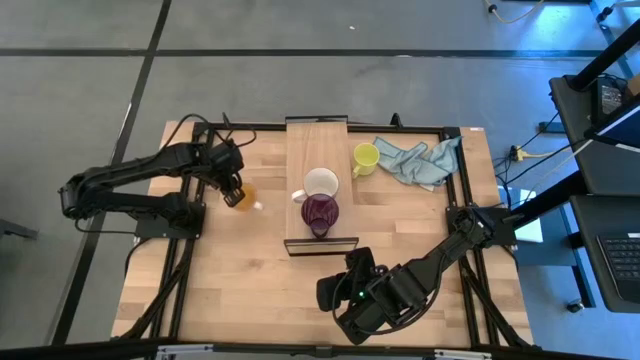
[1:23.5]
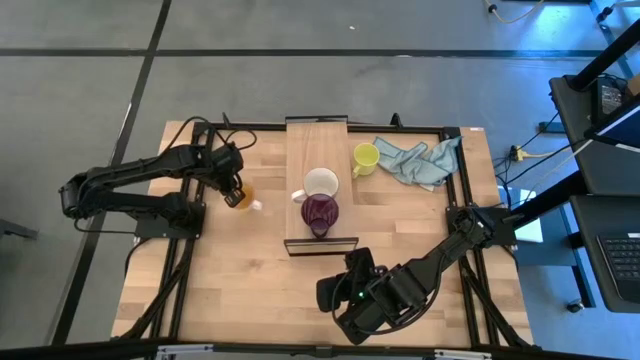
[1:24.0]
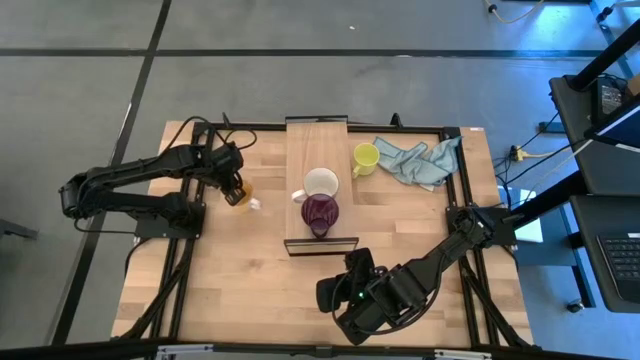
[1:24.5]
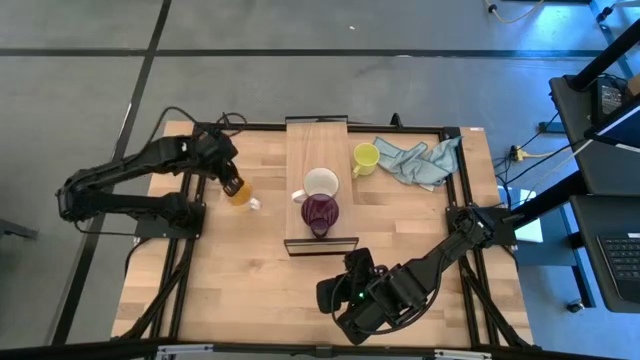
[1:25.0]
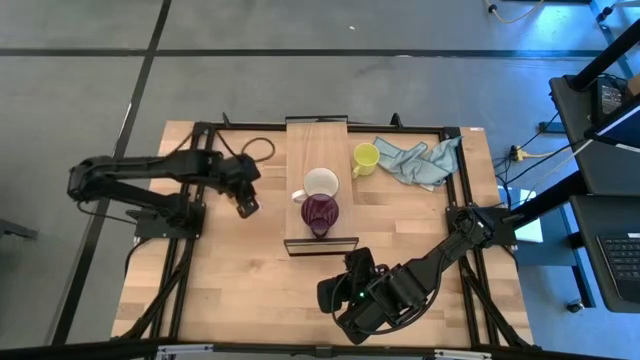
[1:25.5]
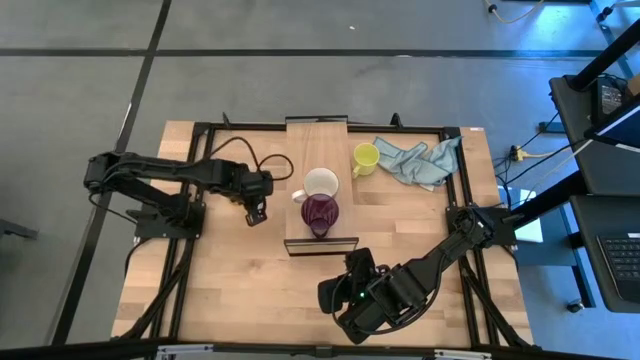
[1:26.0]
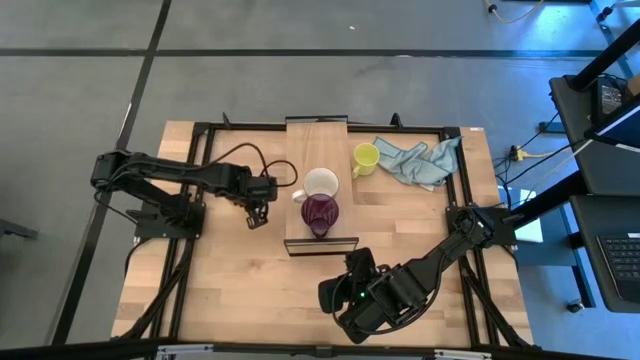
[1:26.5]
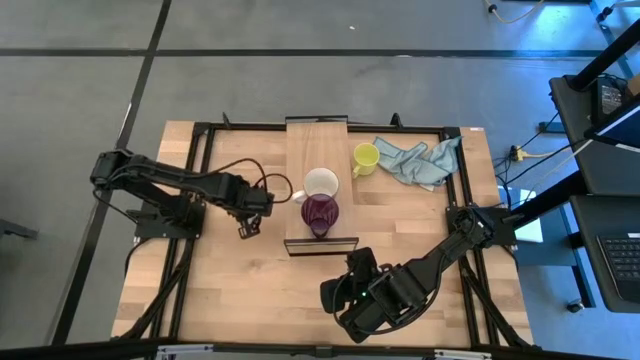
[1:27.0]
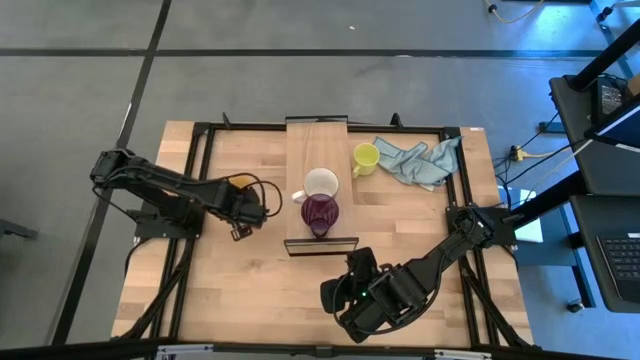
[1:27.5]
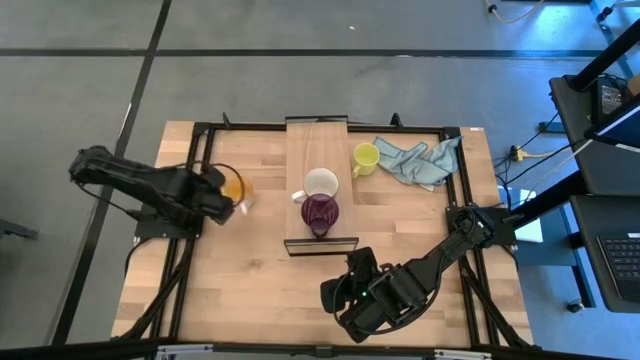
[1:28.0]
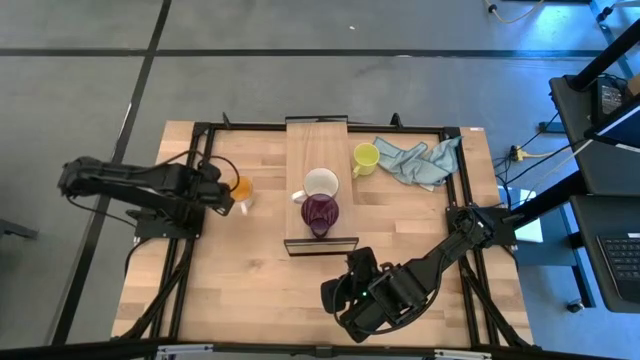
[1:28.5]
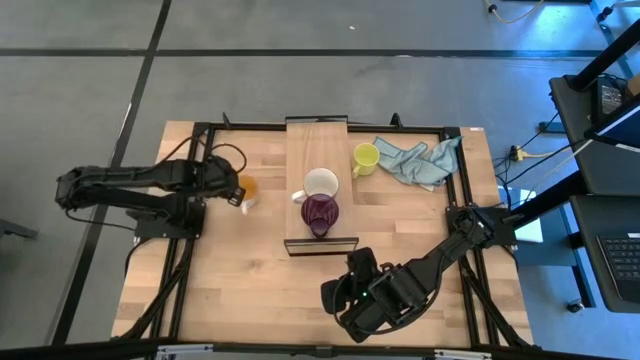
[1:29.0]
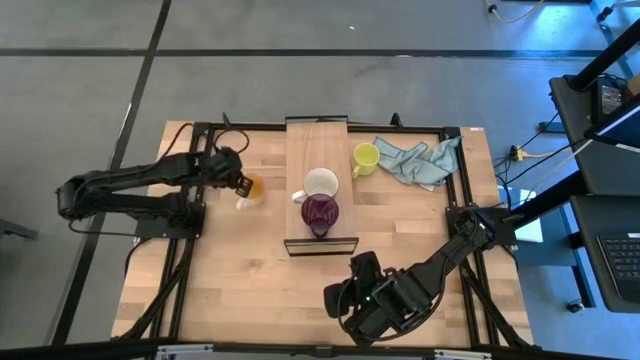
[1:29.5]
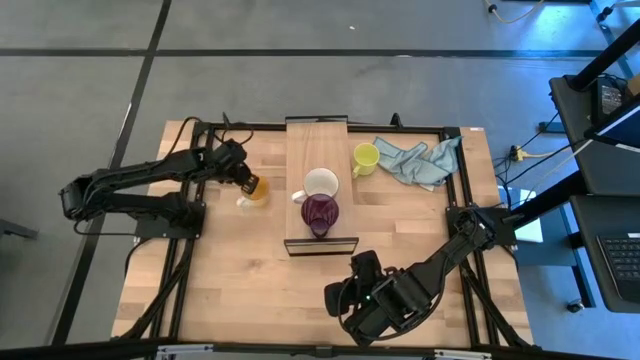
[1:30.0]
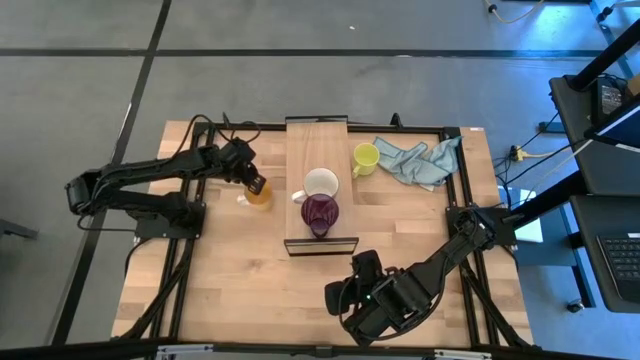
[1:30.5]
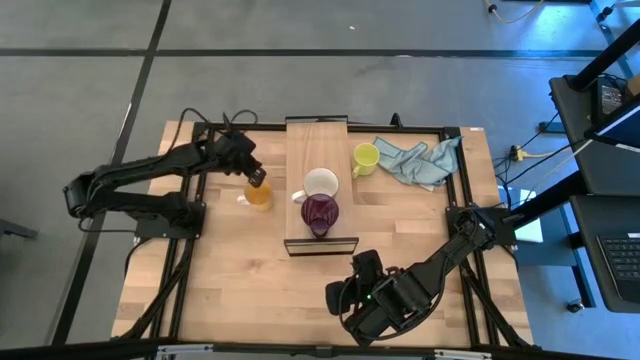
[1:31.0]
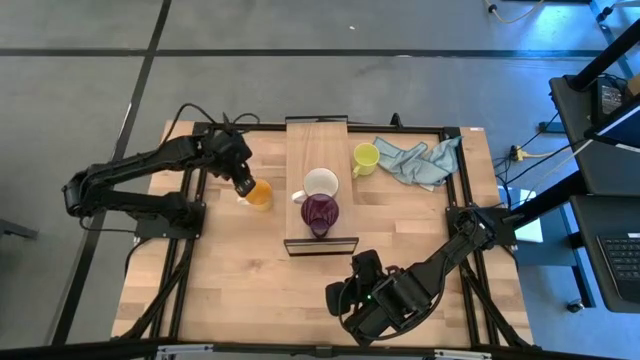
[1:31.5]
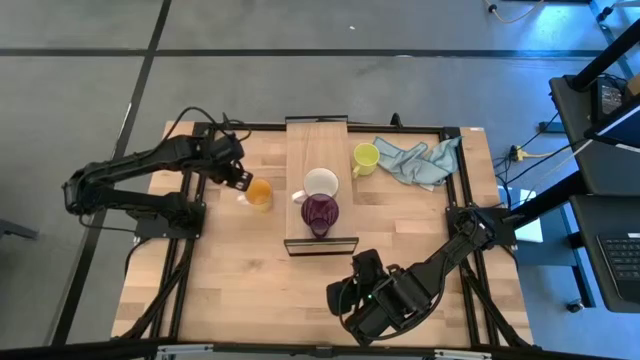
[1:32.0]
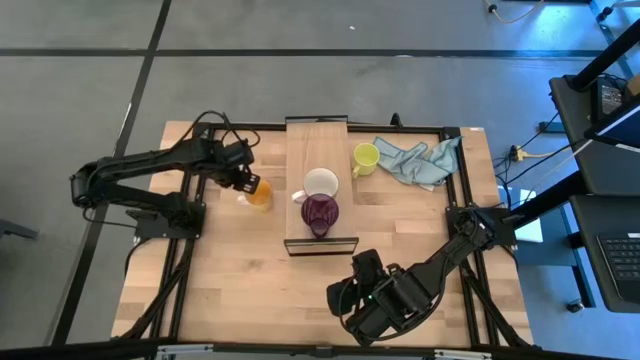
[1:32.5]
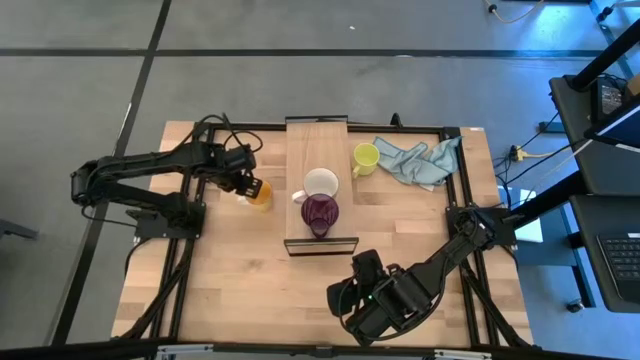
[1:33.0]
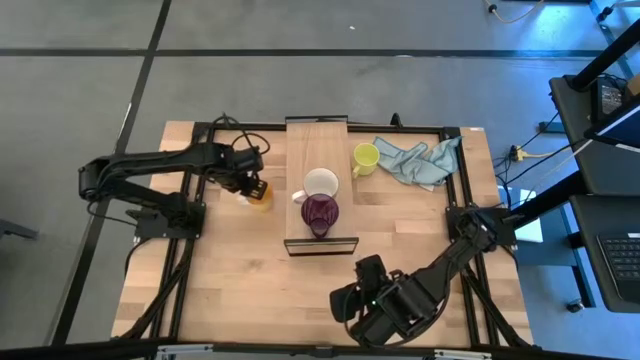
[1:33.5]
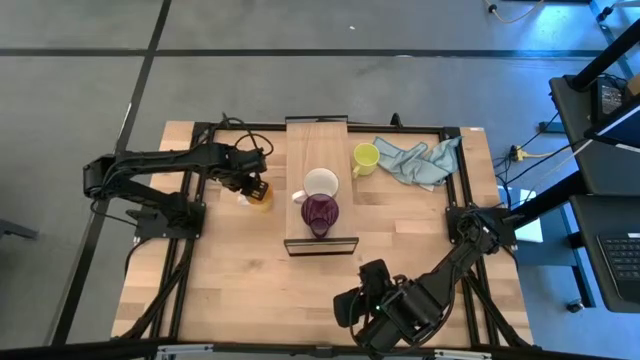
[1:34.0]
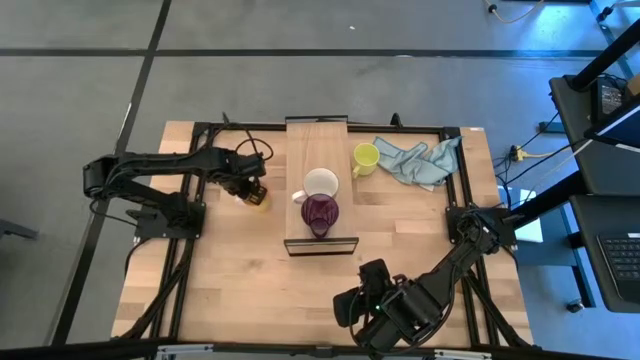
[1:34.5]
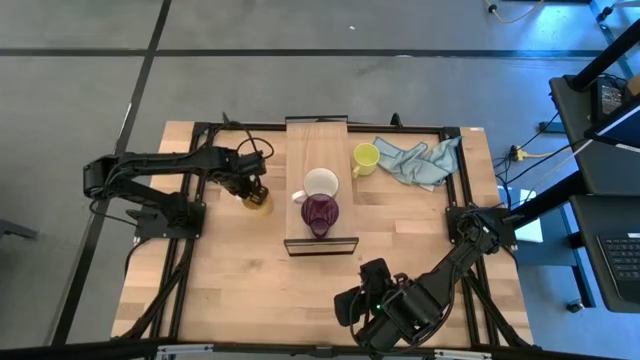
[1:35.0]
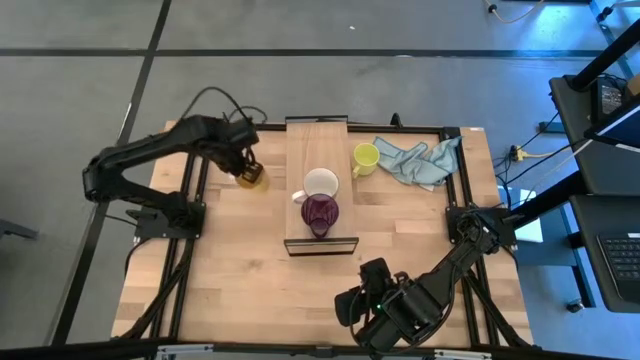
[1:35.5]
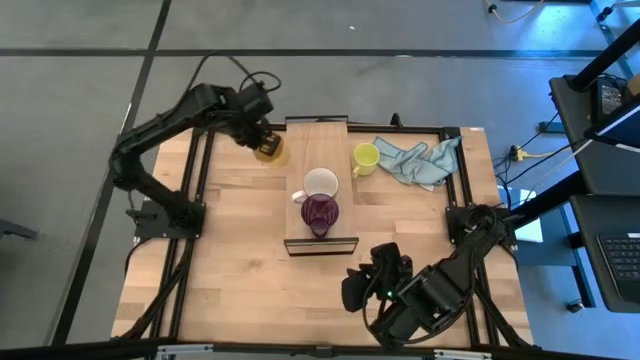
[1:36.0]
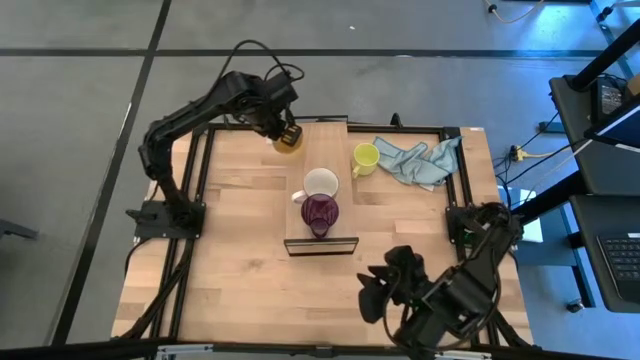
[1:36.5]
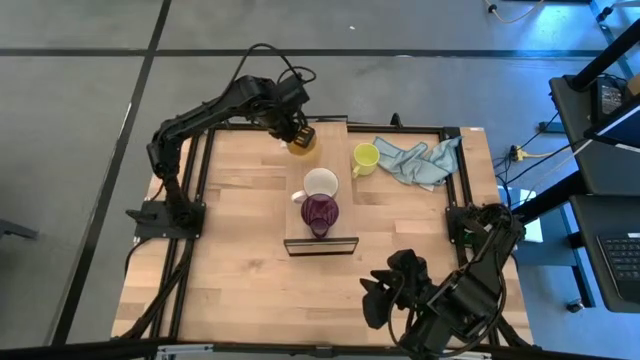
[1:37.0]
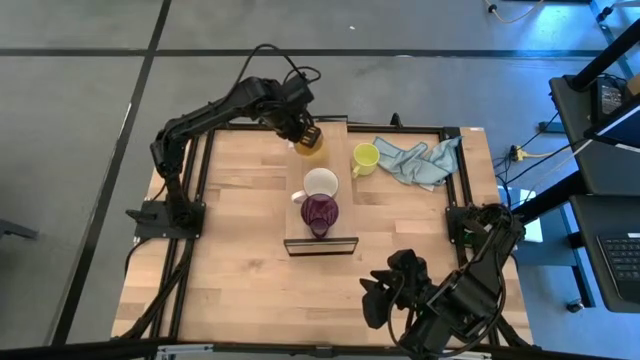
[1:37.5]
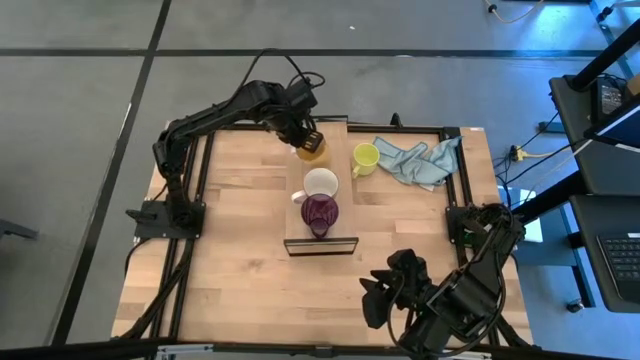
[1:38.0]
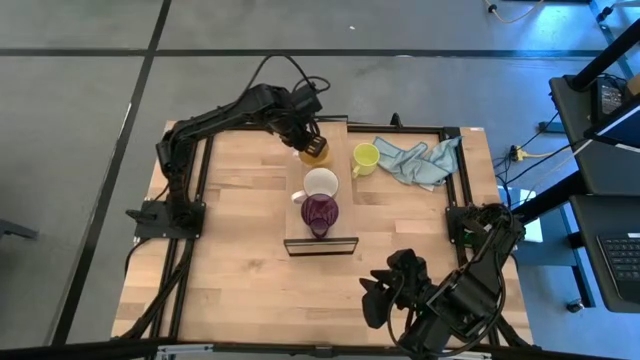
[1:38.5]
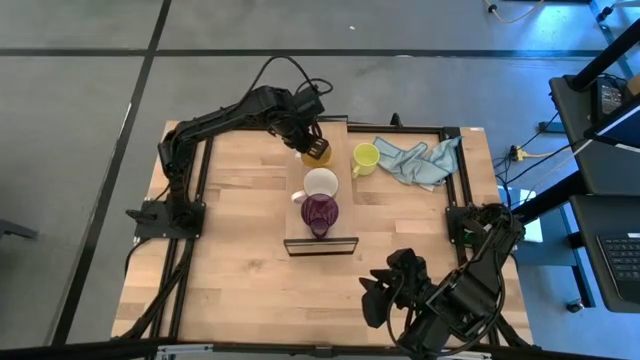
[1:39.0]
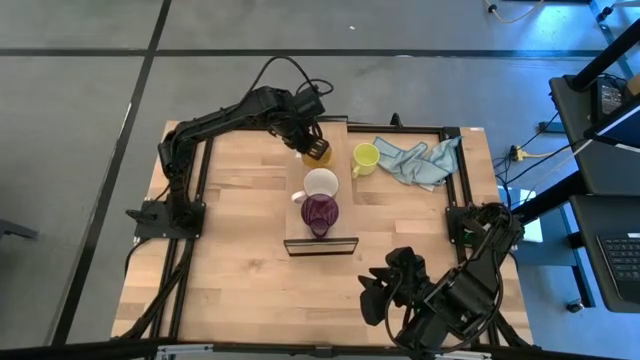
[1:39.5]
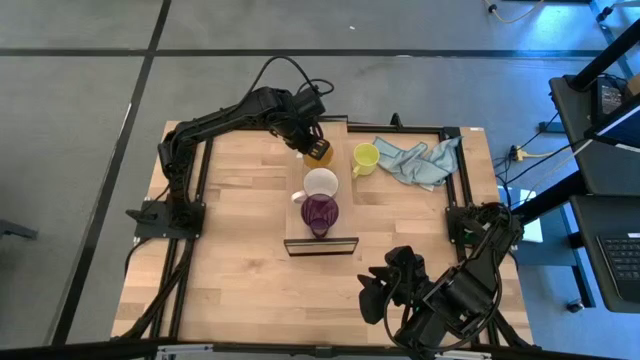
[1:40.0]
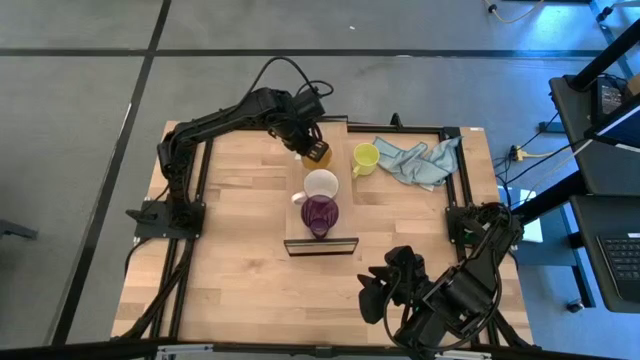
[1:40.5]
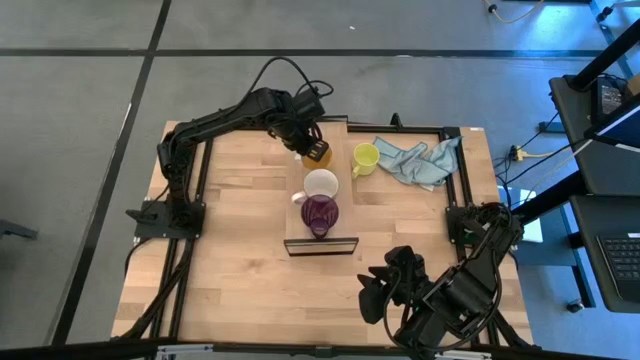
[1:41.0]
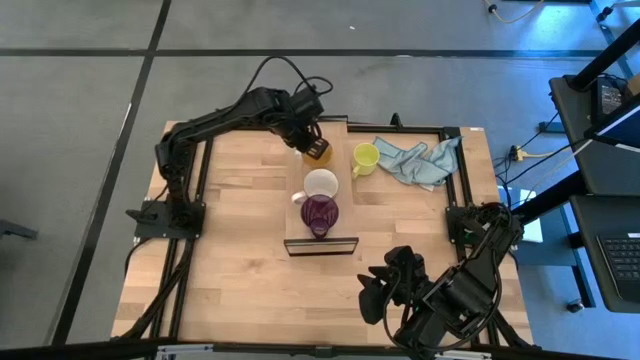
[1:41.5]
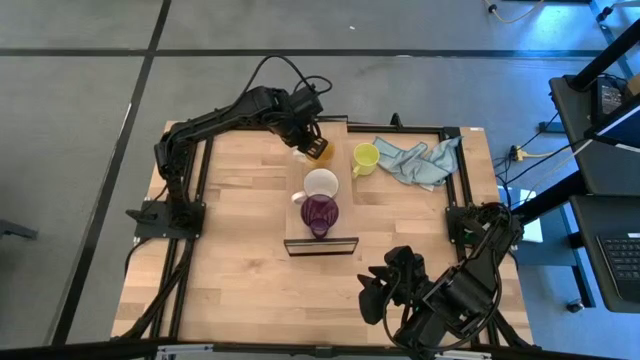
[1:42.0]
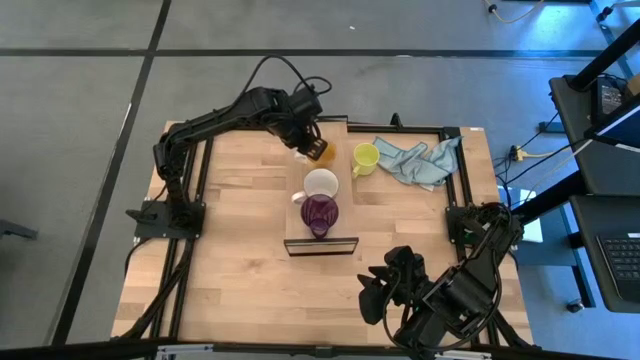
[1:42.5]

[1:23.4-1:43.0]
Task: Stack small to large cups/mugs on shelf
Put the yellow mug on the shelf

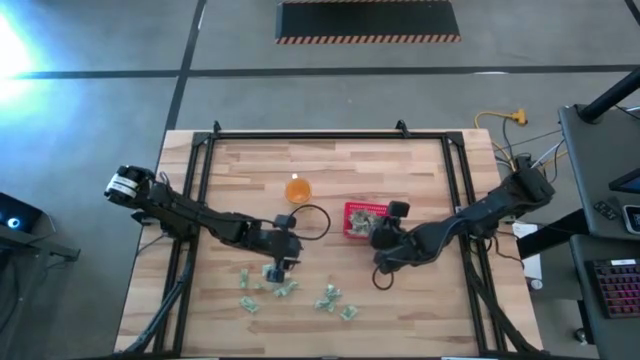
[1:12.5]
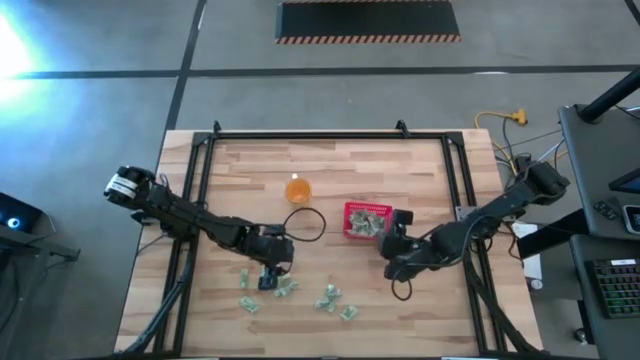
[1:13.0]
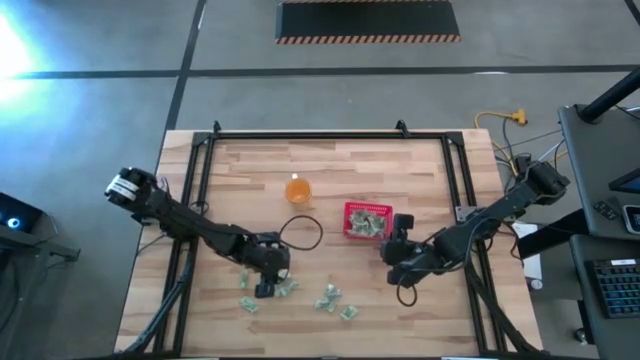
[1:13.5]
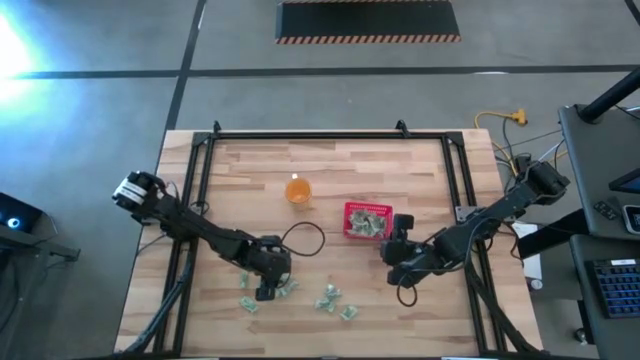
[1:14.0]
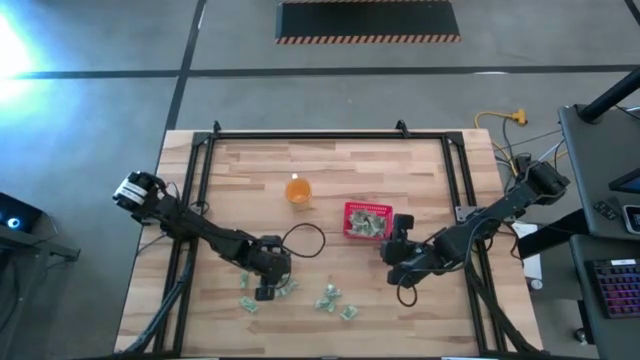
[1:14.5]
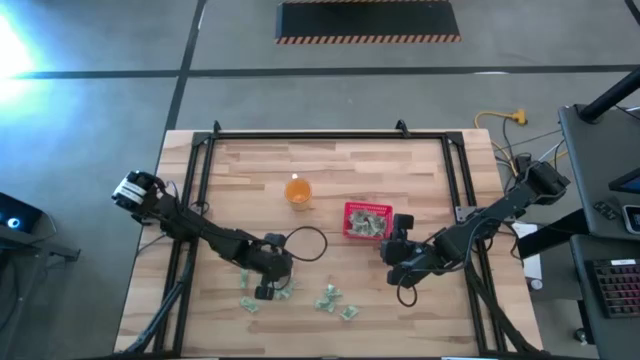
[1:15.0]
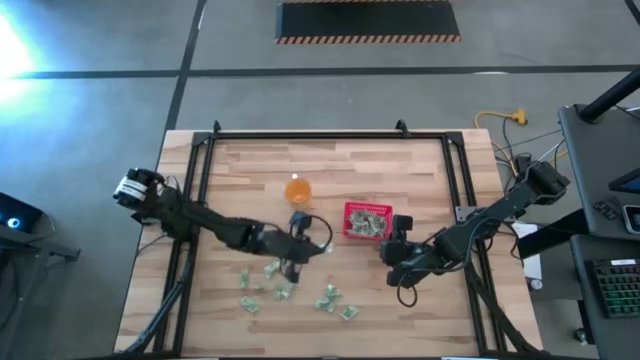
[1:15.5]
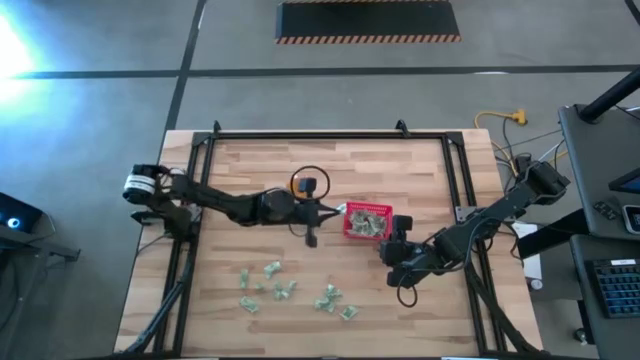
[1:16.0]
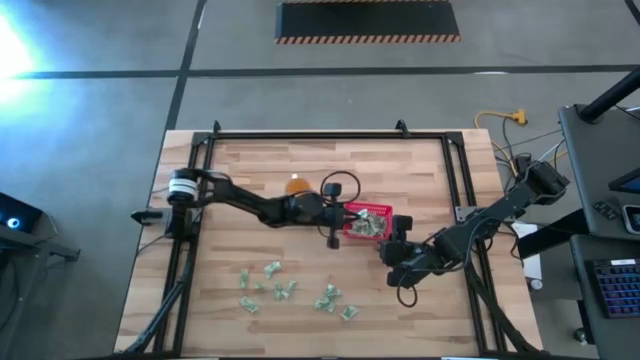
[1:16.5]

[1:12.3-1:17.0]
Task: Pick and place Stevia / Truvia into bins
Put the stevia packet into the basket
